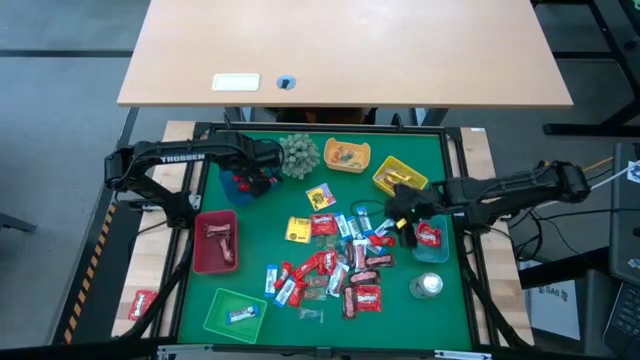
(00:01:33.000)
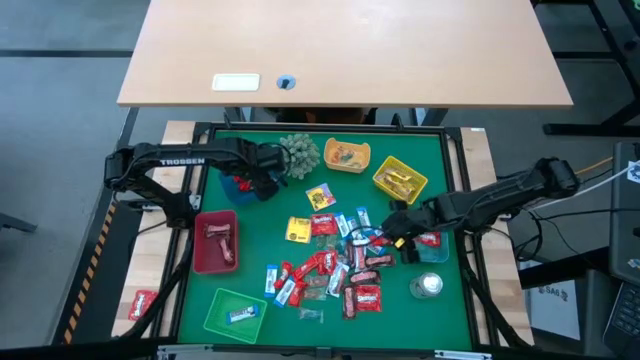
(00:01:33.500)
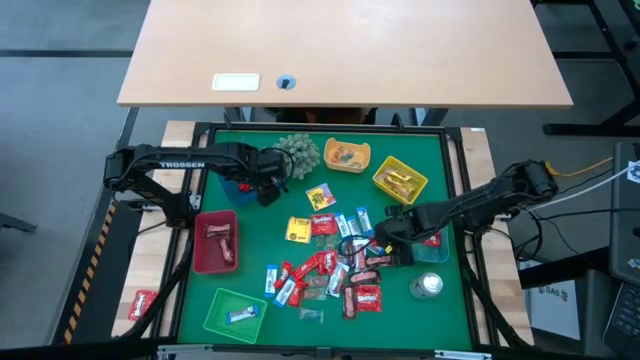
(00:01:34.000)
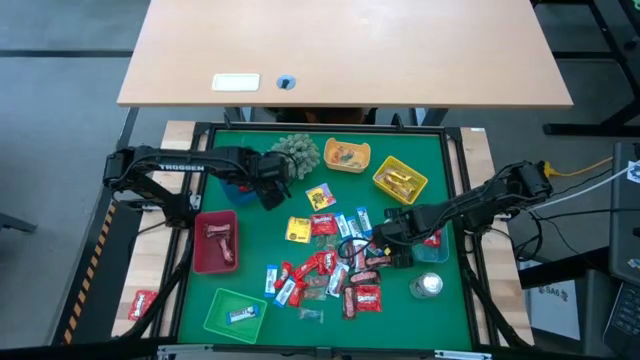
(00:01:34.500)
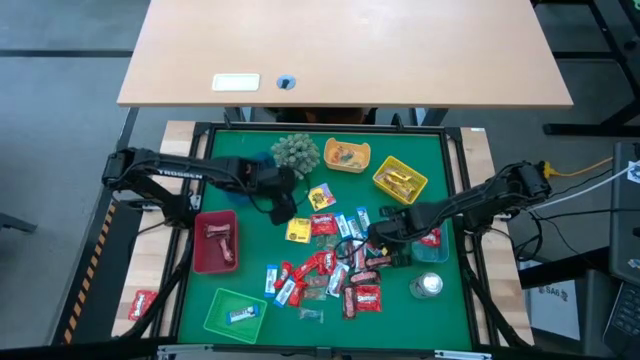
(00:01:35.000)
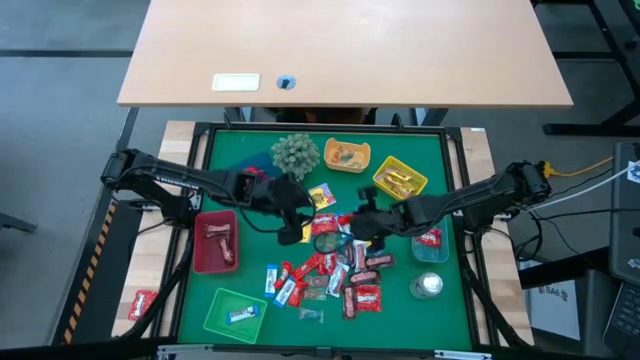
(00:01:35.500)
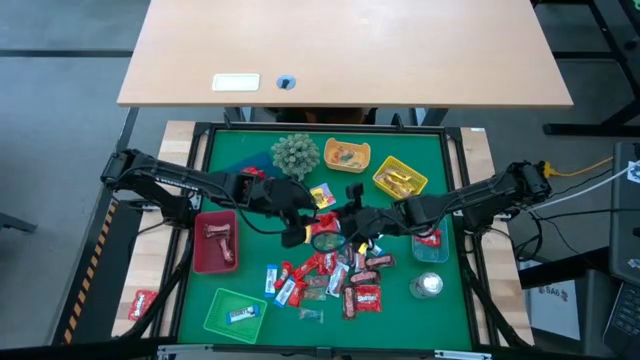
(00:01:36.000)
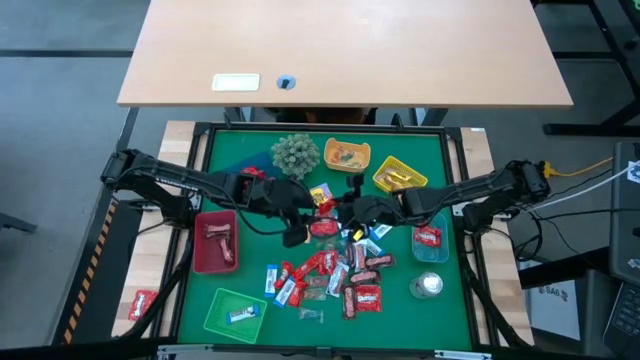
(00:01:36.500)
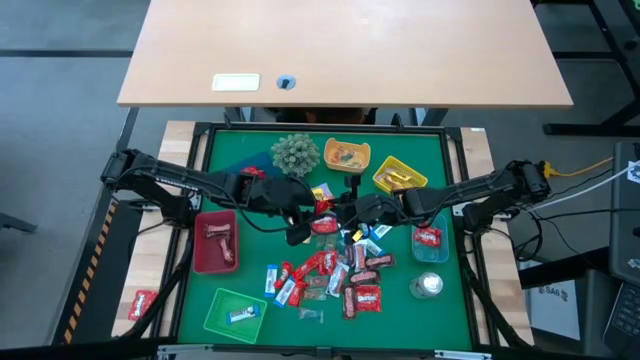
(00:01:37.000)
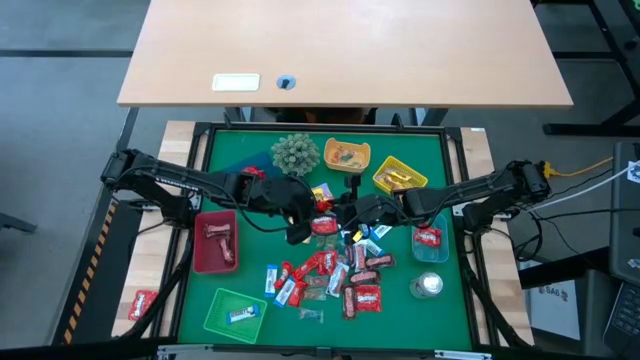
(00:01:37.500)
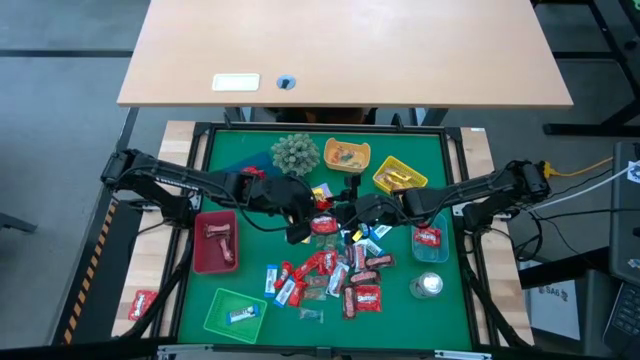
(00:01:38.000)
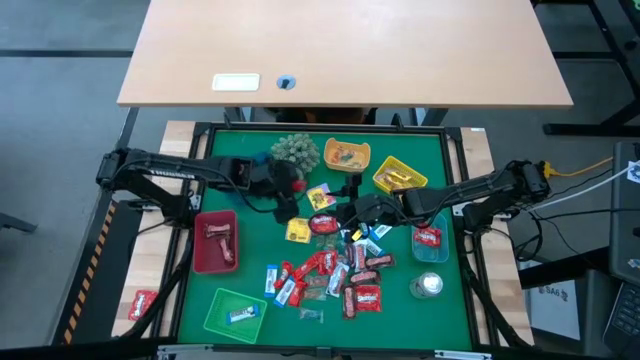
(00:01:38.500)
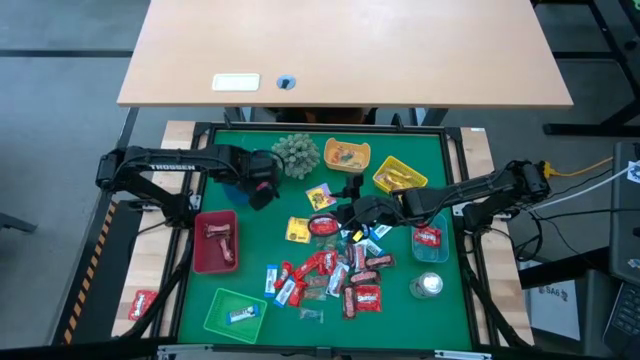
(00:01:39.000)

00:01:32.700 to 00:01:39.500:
Task: Sort candy
Put the red chocolate into the blue bin

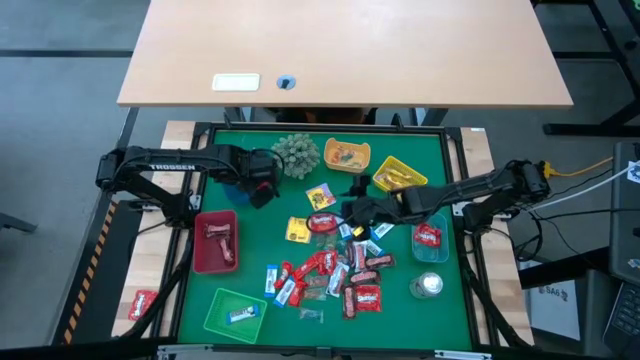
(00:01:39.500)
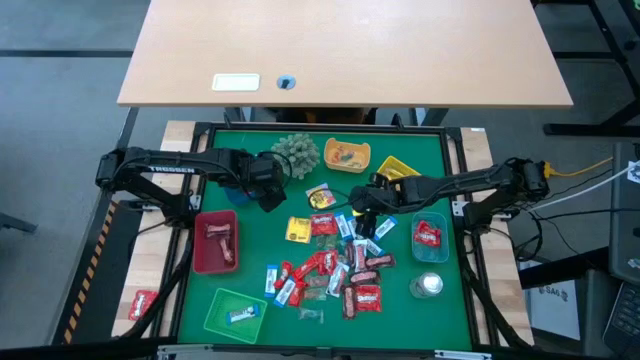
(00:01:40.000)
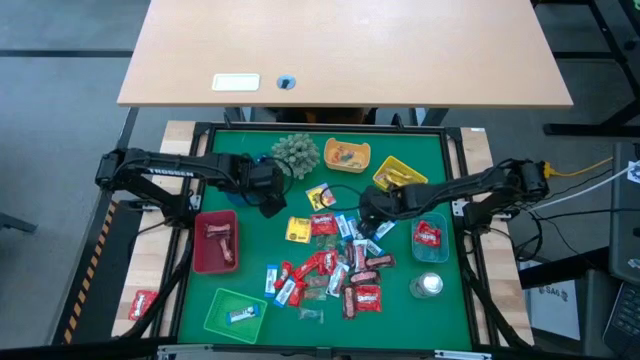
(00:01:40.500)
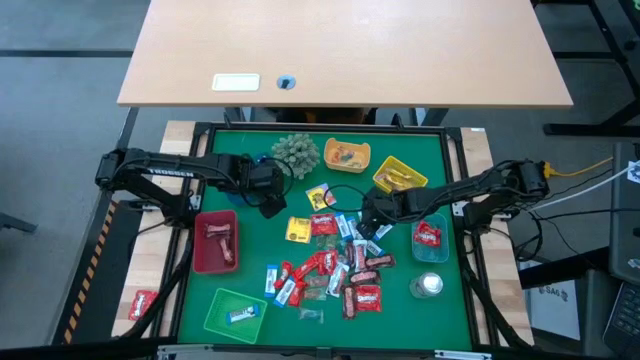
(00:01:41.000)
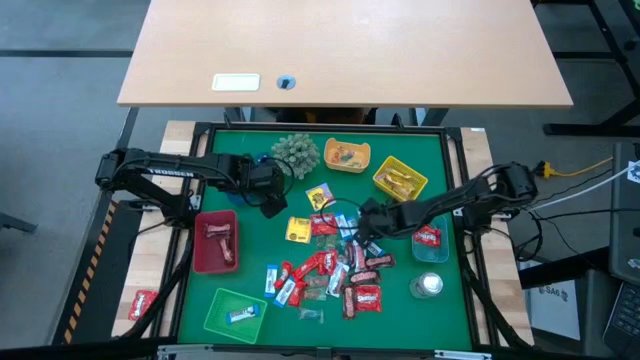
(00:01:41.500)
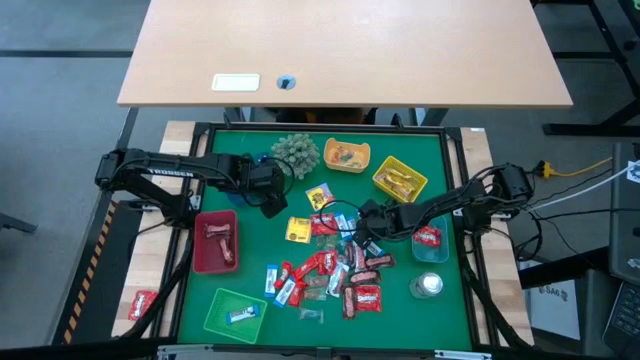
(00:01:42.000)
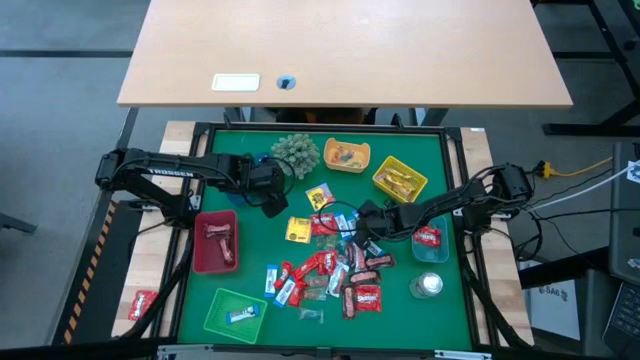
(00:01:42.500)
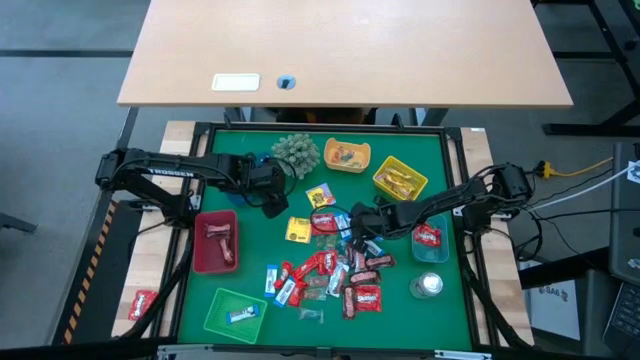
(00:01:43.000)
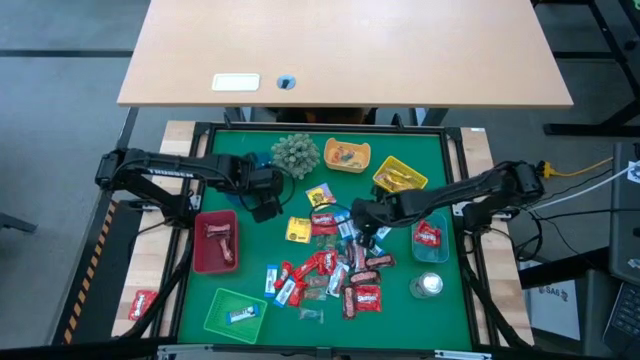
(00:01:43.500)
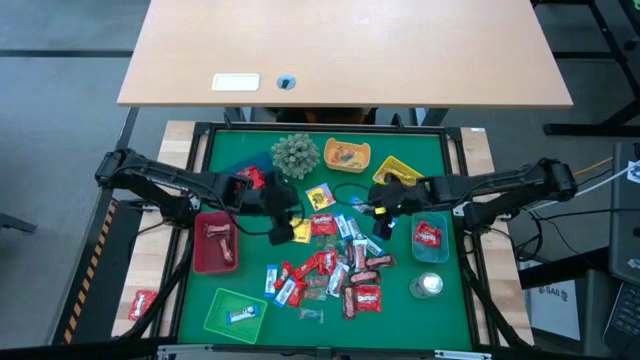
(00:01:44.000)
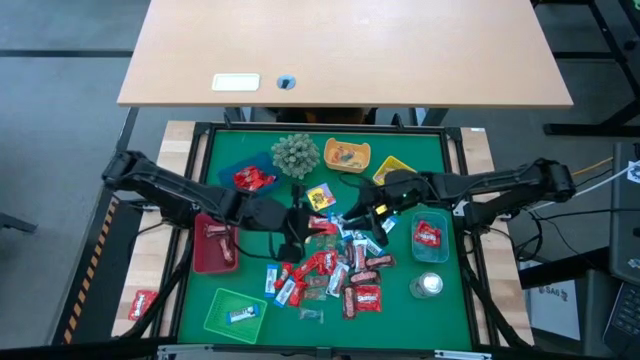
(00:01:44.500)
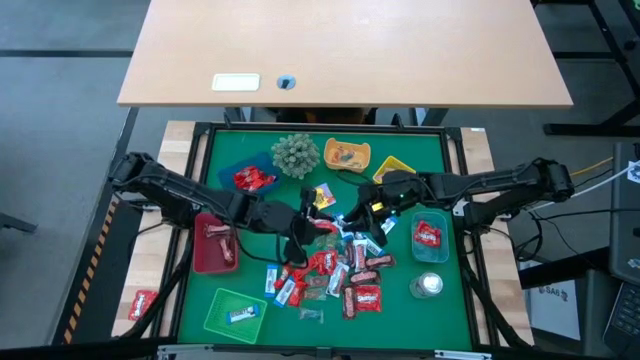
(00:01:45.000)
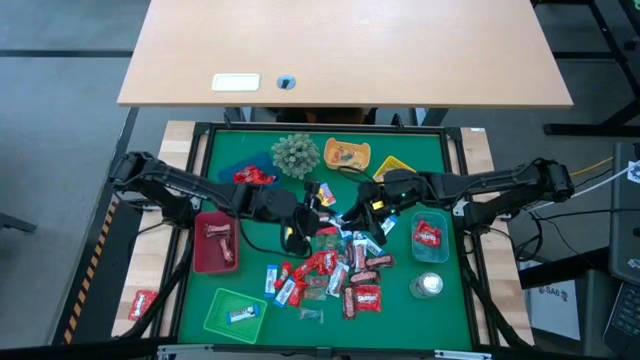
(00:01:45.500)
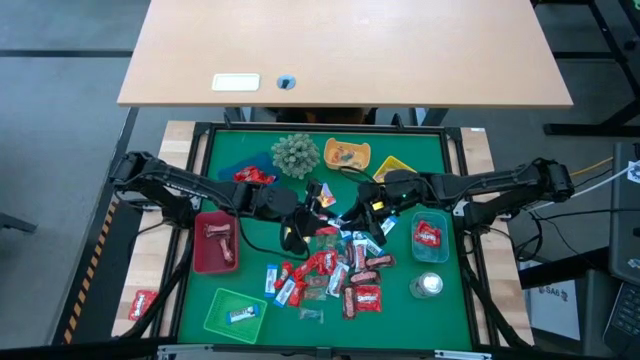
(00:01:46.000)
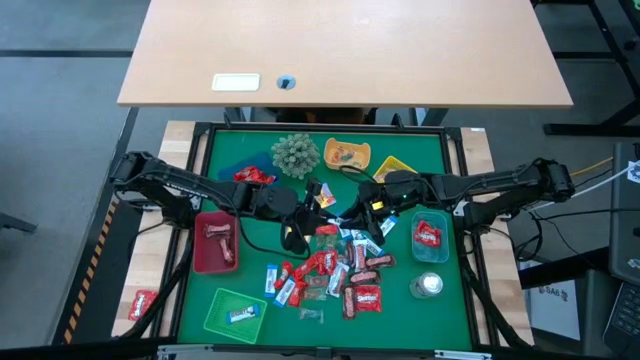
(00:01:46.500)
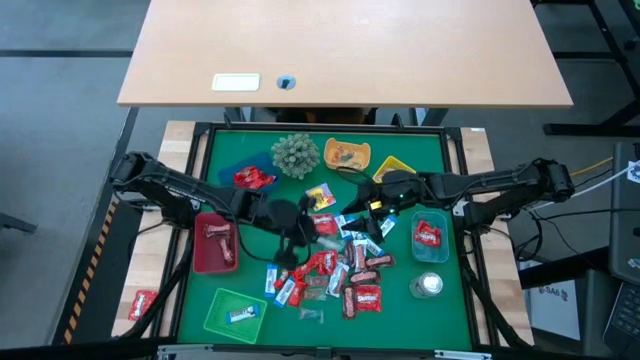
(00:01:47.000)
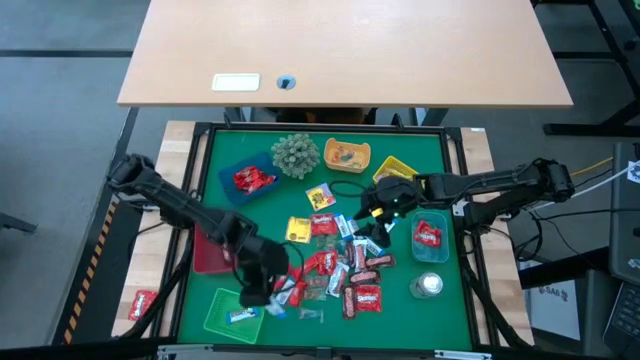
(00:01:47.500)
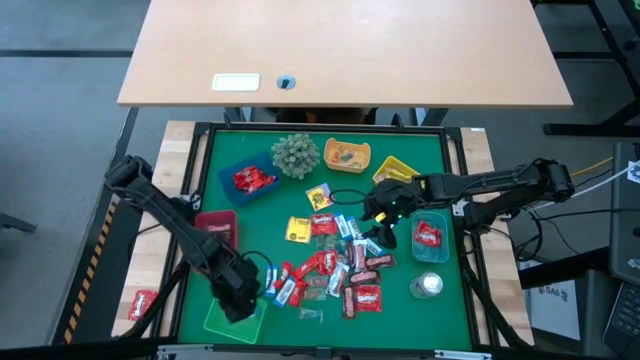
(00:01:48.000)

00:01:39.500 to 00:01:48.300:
Put the white-blue chocolate into the green bin

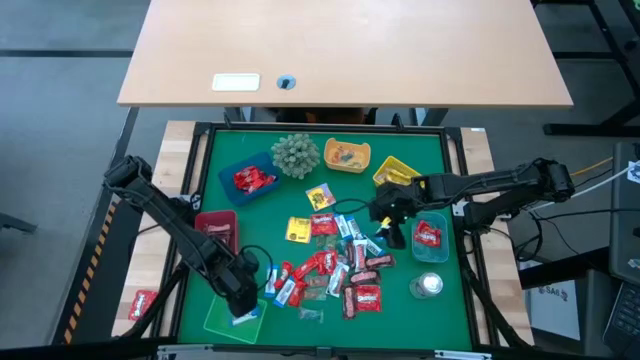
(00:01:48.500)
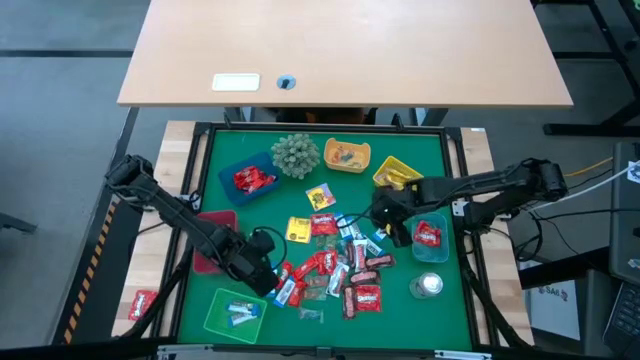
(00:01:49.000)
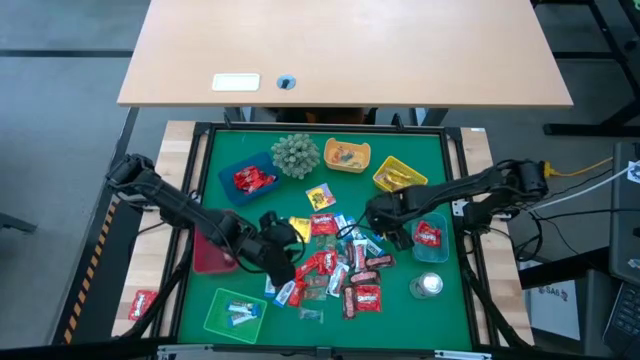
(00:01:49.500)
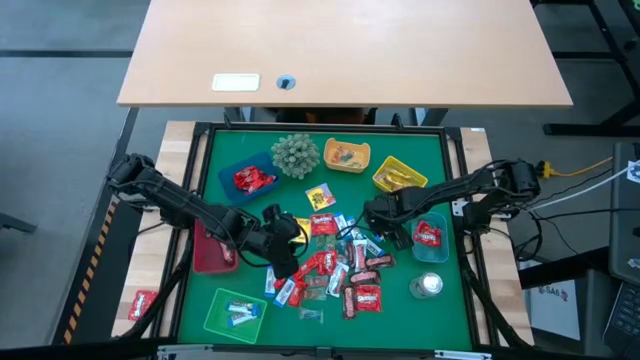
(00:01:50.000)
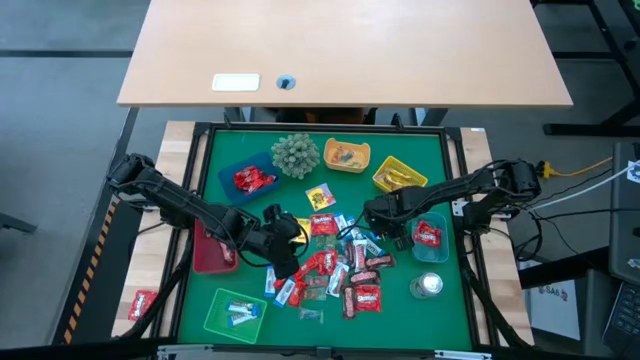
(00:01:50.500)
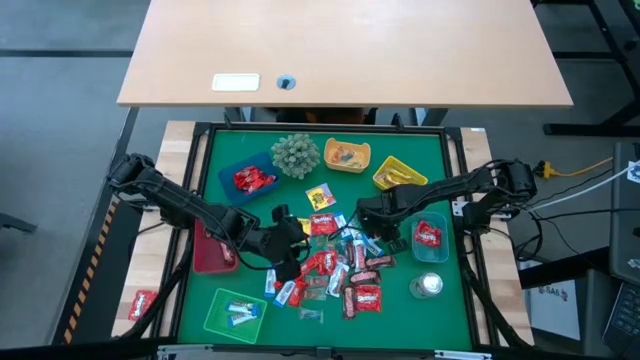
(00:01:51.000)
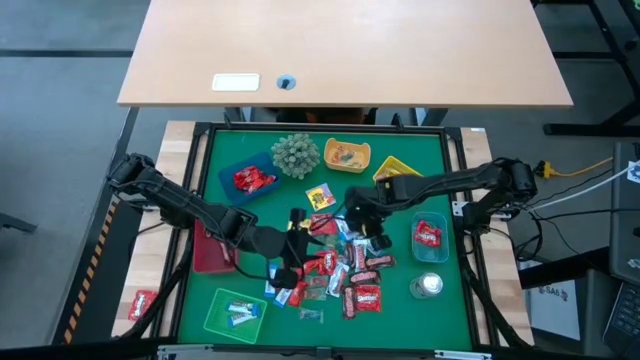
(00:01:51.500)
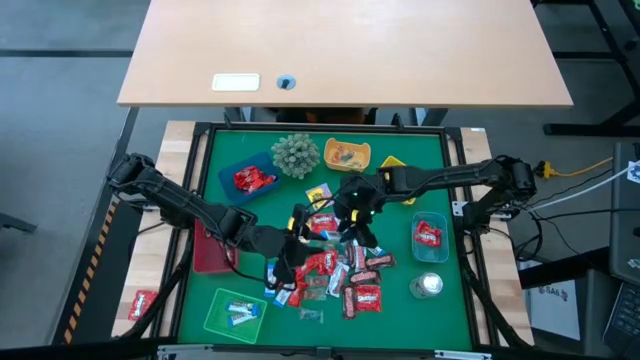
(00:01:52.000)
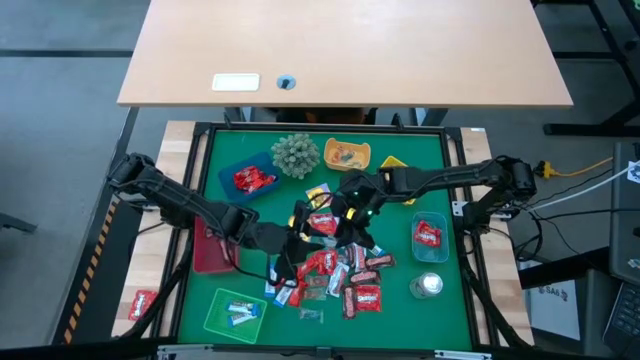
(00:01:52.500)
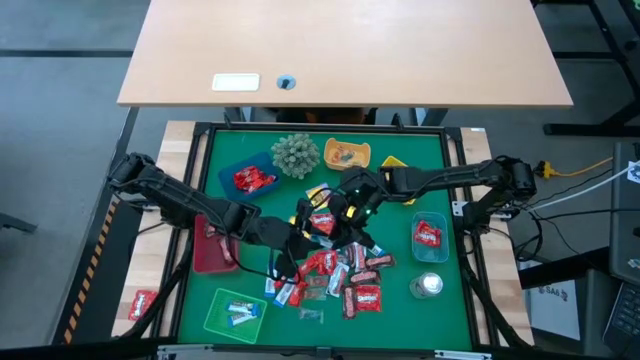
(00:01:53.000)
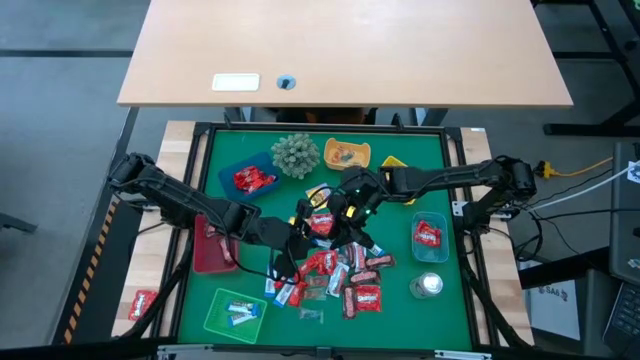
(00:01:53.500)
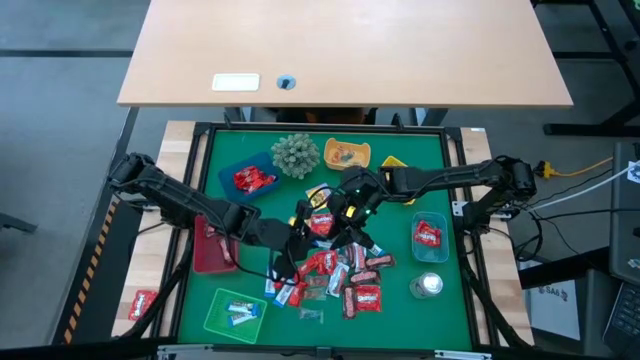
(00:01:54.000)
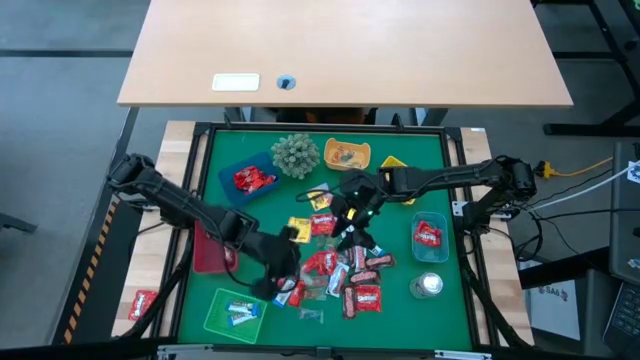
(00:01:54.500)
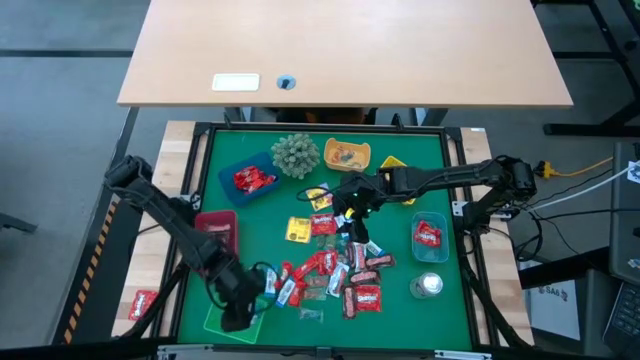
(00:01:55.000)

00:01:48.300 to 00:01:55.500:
Put the white-blue chocolate into the green bin
